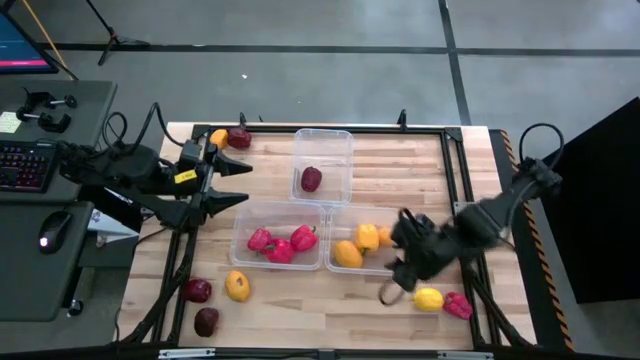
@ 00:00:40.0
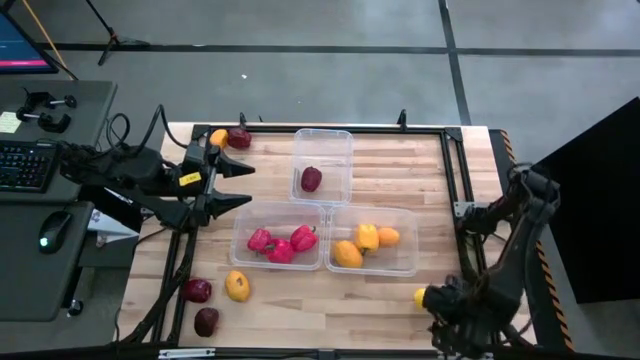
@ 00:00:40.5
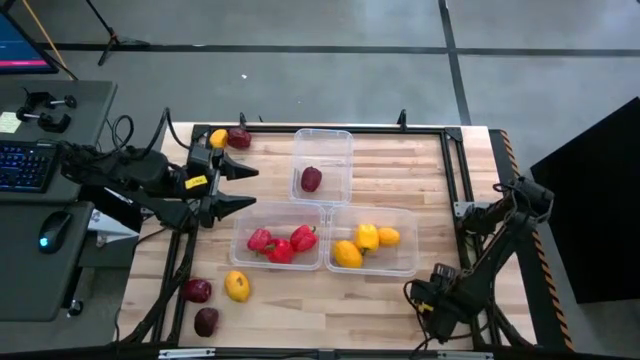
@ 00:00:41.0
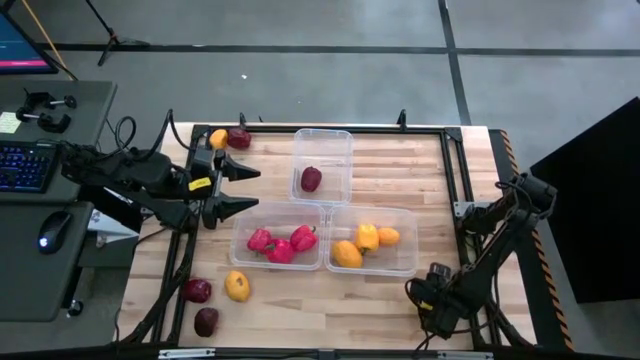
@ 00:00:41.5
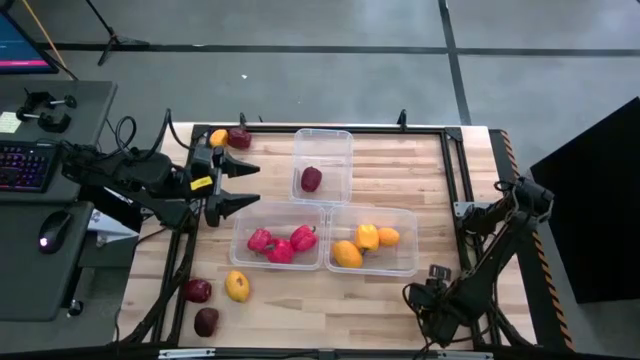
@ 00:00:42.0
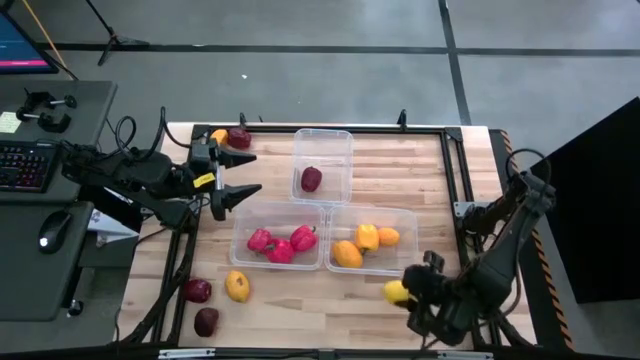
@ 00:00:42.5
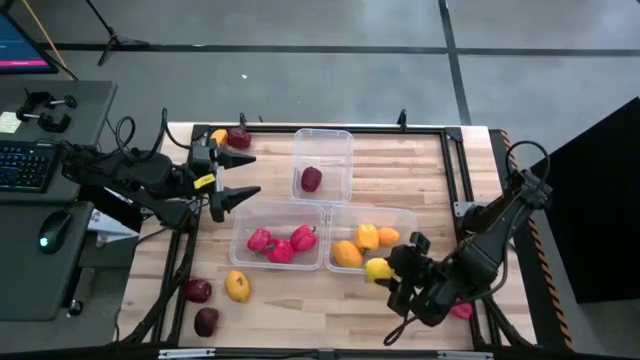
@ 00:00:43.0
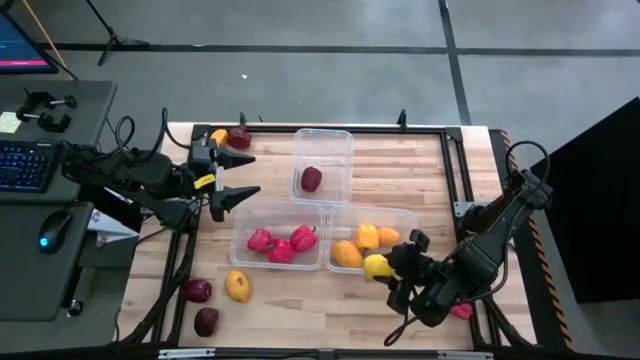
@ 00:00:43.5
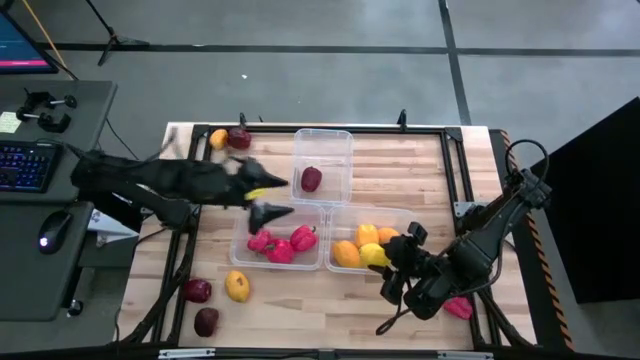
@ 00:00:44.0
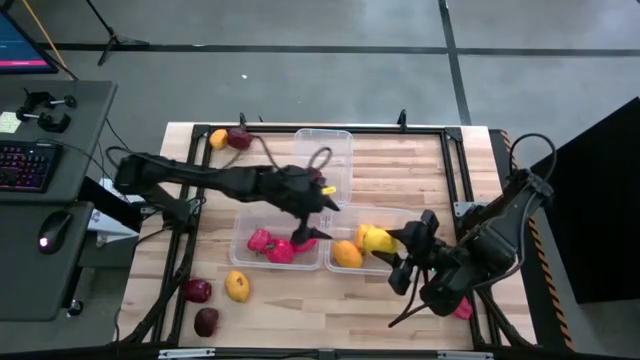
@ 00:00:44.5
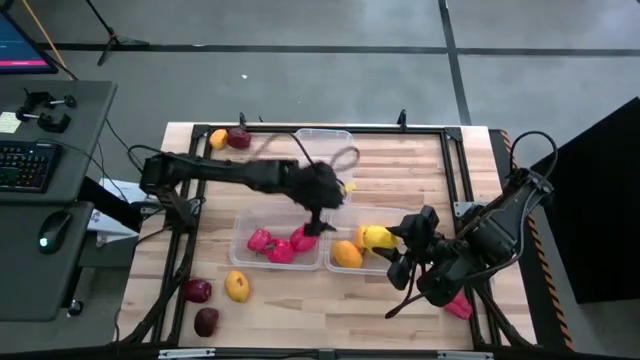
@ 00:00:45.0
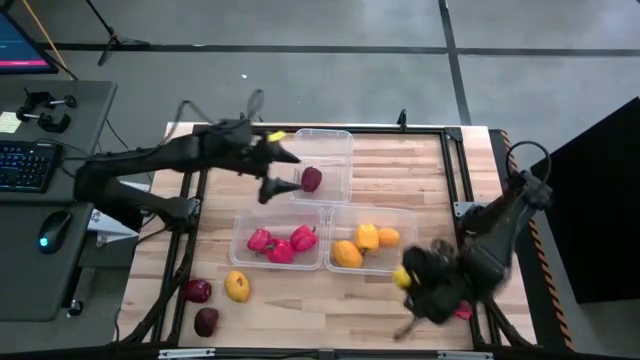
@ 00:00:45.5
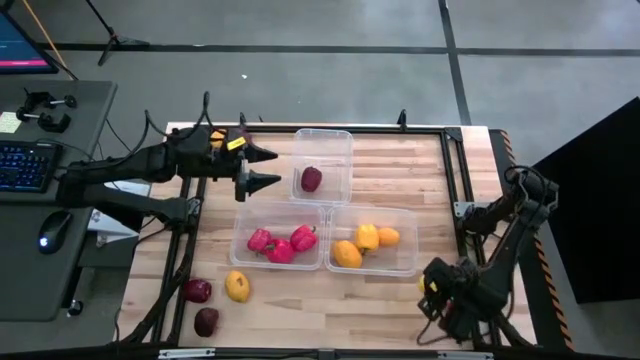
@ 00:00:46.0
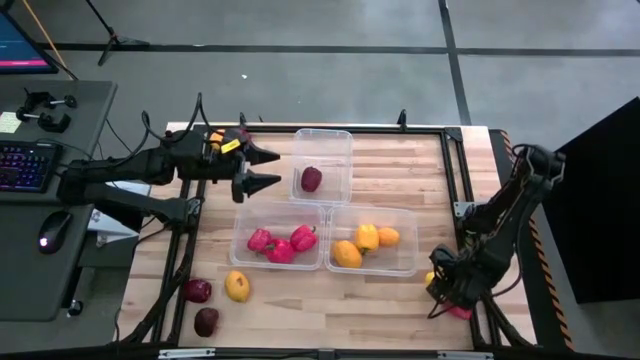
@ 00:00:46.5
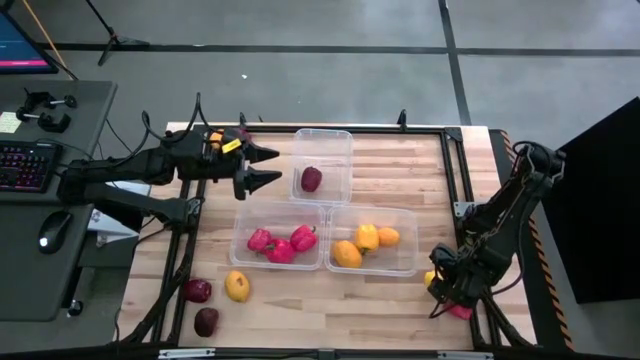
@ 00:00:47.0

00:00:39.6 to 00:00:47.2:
Task: Sort produce into baskets
Put the bottom right lemon into the middle right transparent bin

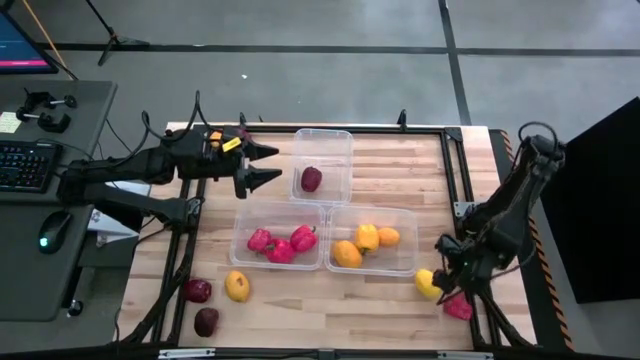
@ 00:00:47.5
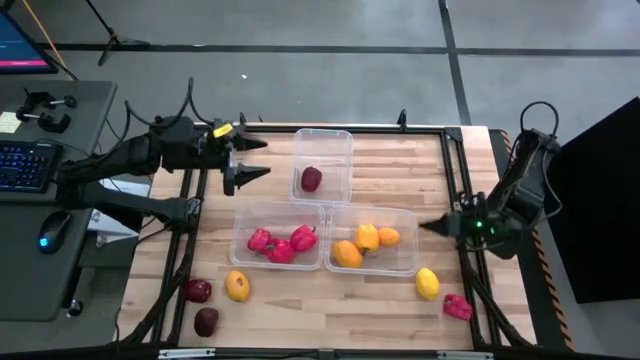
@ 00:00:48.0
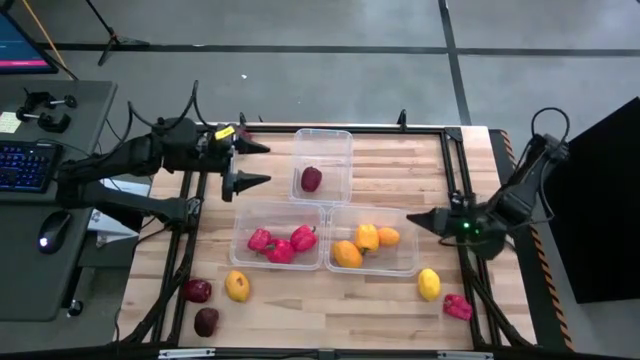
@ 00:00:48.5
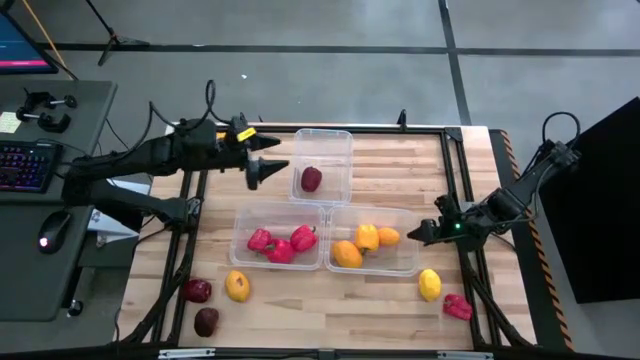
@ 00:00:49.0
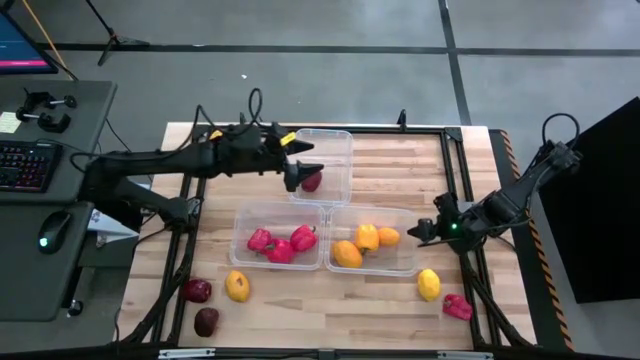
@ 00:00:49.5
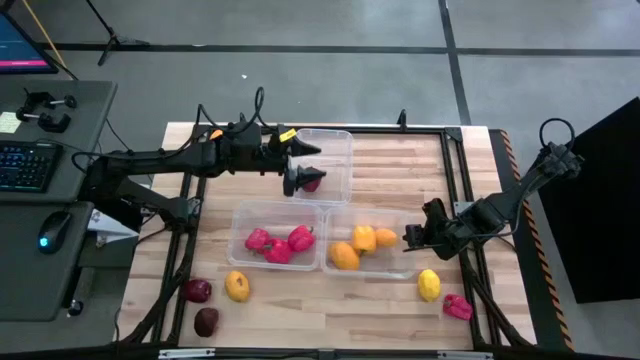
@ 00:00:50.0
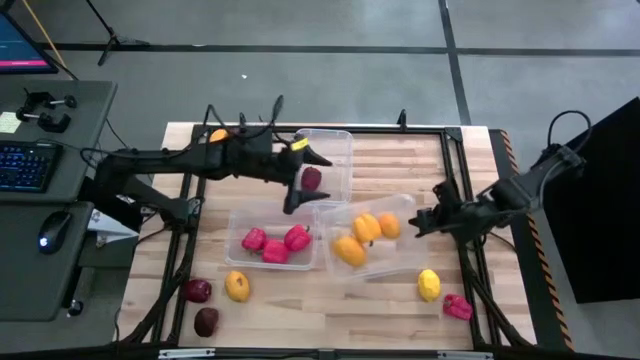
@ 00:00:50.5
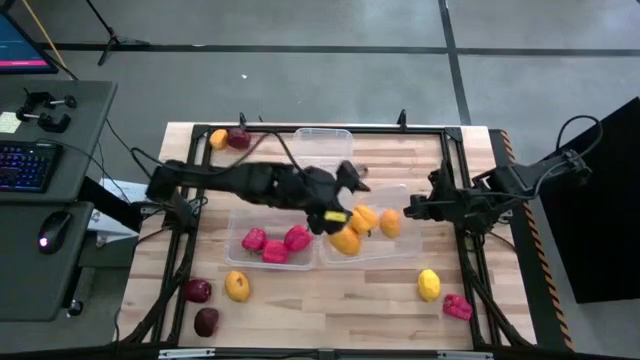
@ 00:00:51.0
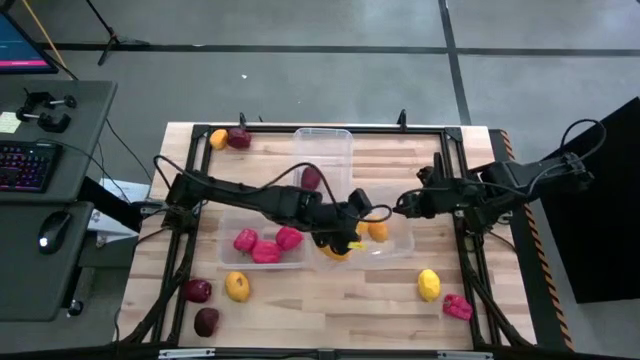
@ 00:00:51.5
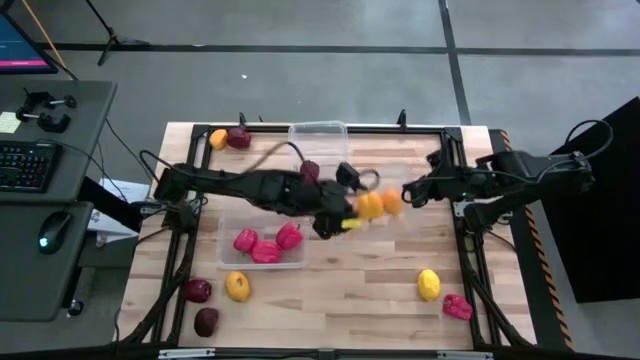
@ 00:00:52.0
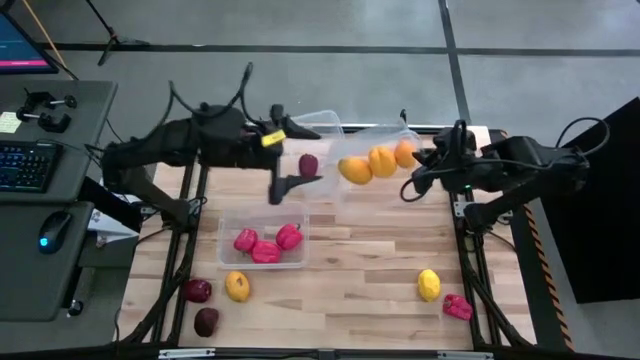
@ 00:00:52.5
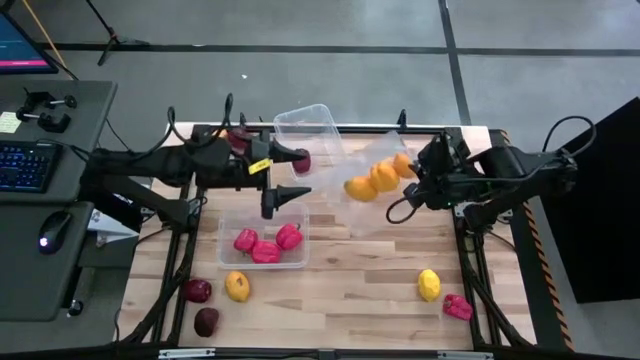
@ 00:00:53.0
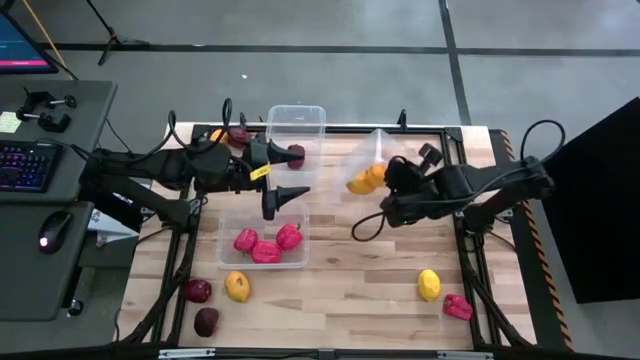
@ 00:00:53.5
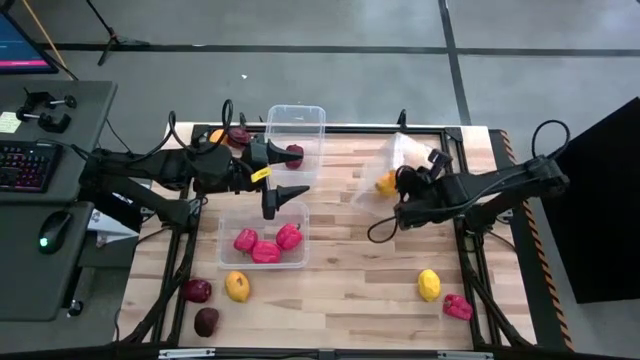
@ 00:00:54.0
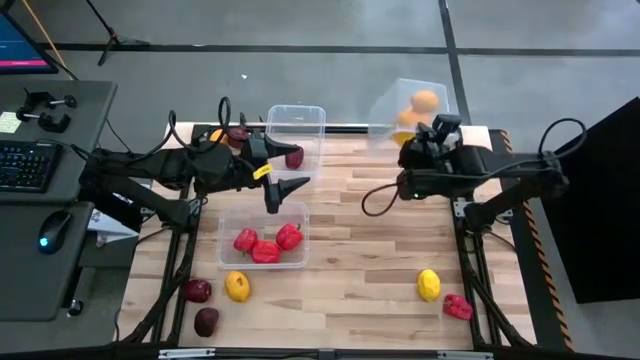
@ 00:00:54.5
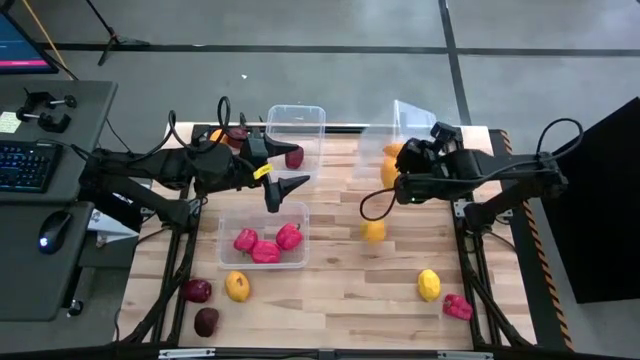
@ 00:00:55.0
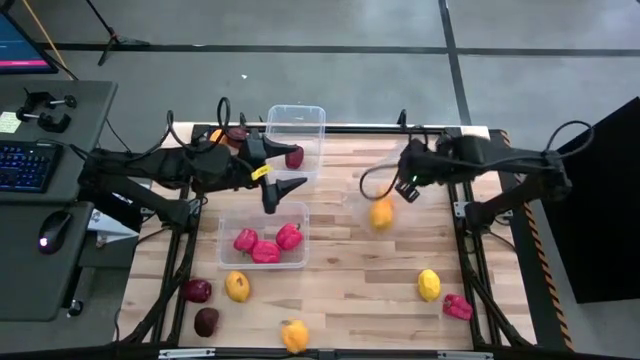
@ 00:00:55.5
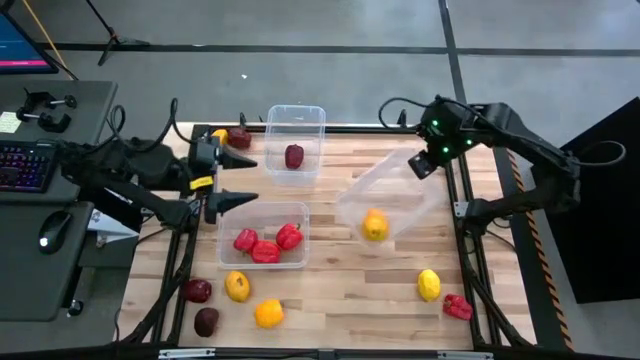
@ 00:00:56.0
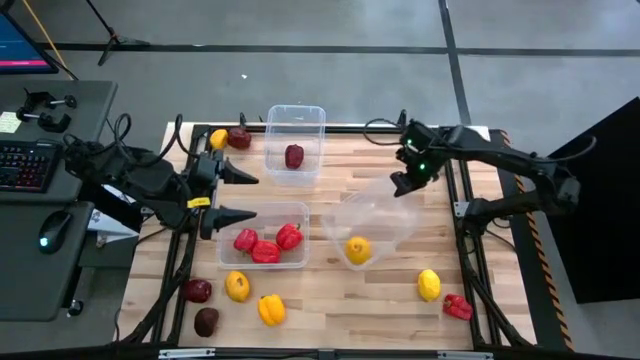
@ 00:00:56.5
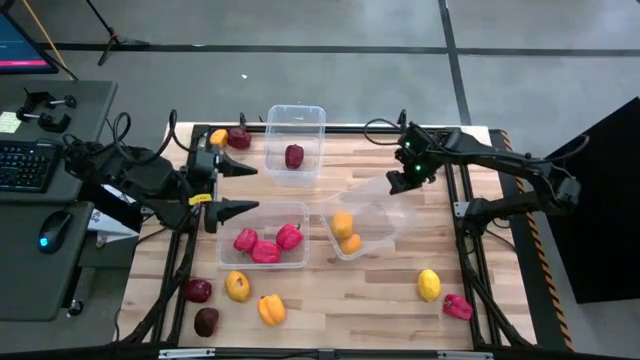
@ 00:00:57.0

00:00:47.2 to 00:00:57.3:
Remove the yellow bell pepper from the middle right transparent bin

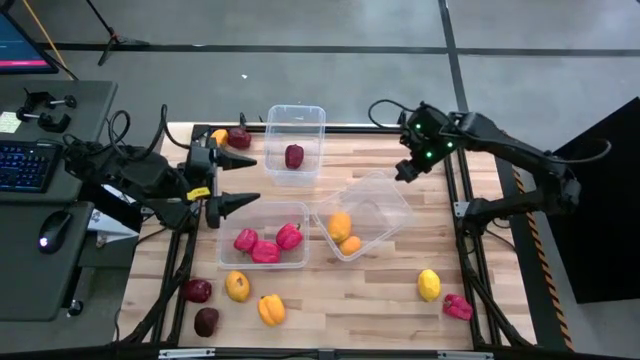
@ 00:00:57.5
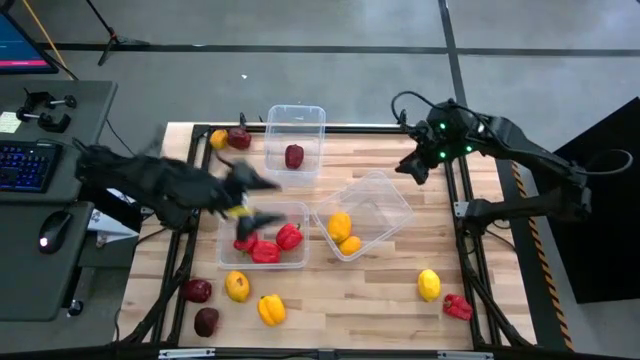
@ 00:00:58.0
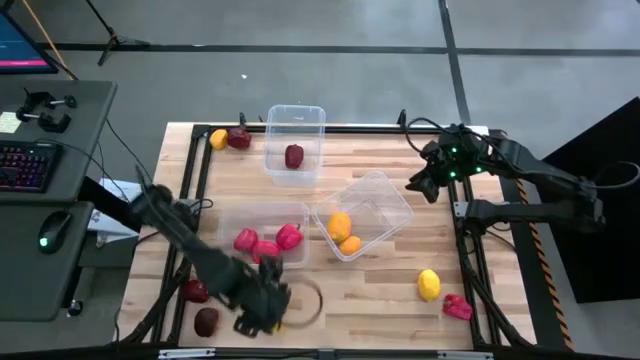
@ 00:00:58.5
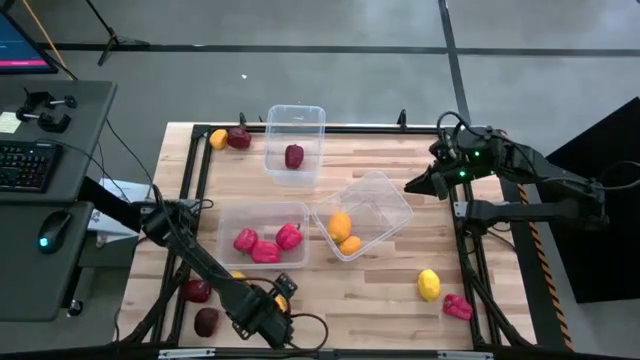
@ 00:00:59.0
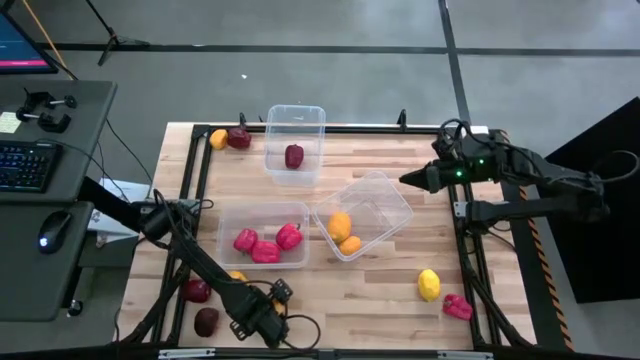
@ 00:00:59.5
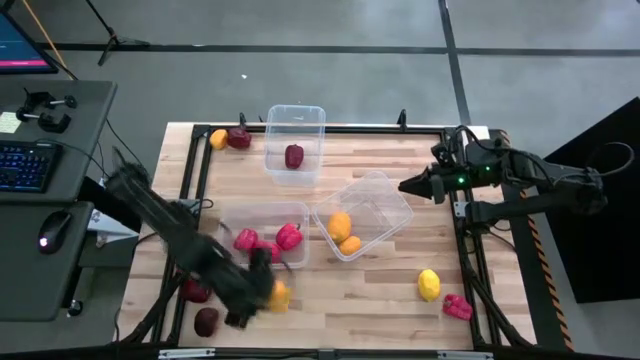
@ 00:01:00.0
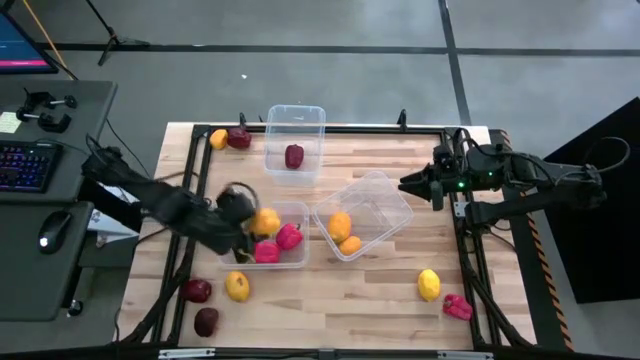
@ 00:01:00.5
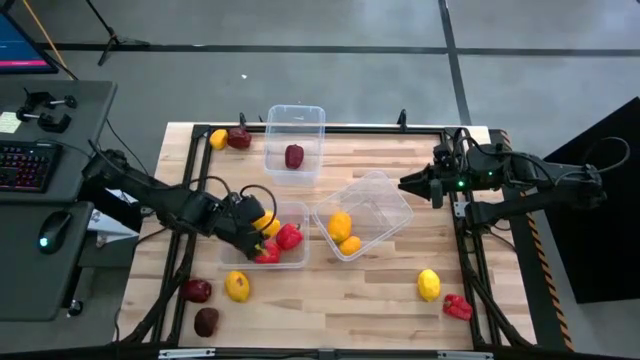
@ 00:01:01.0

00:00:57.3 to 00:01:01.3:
Put the yellow bell pepper into the middle left transparent bin
